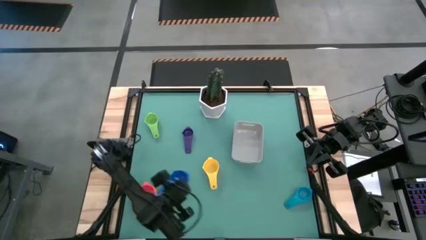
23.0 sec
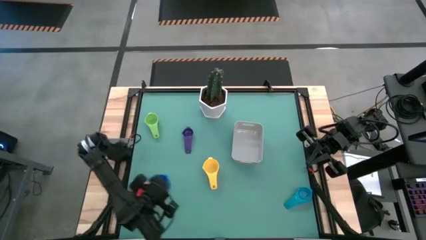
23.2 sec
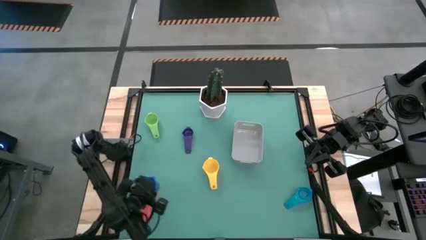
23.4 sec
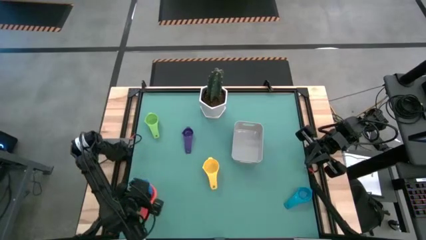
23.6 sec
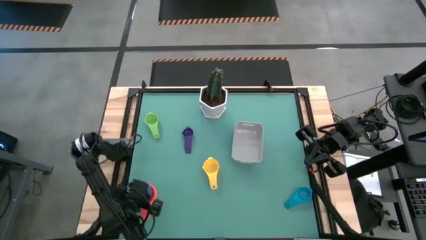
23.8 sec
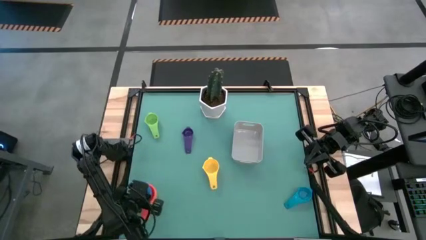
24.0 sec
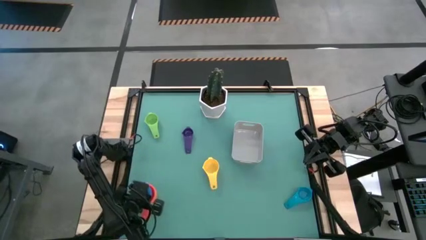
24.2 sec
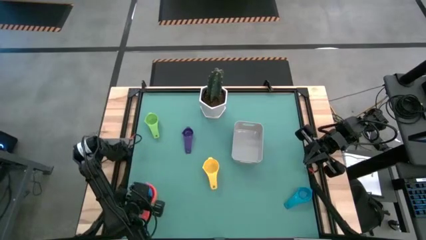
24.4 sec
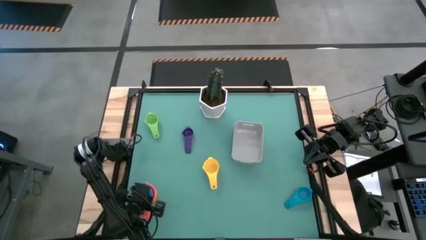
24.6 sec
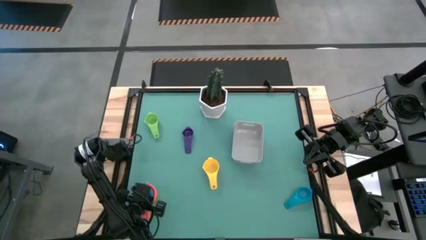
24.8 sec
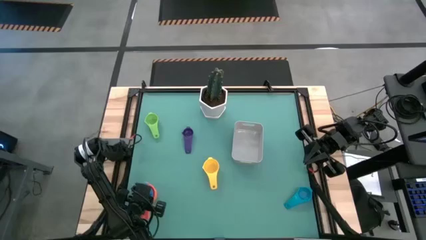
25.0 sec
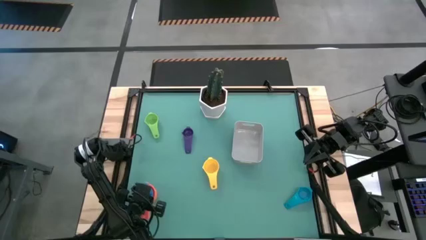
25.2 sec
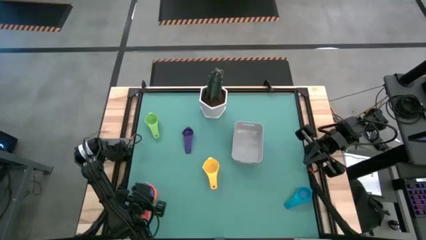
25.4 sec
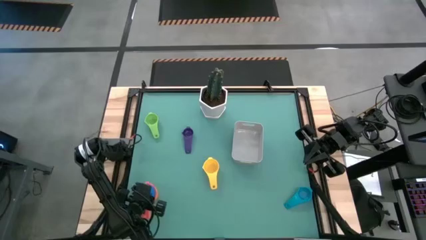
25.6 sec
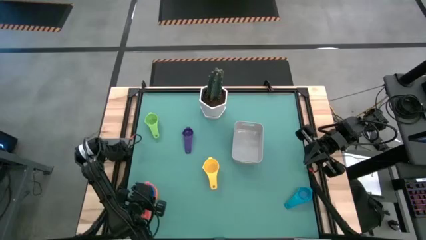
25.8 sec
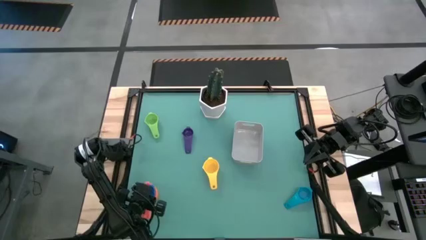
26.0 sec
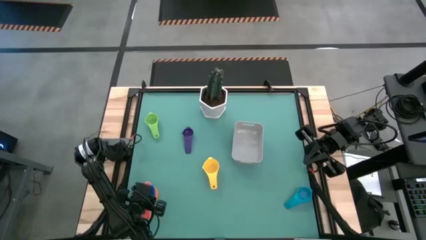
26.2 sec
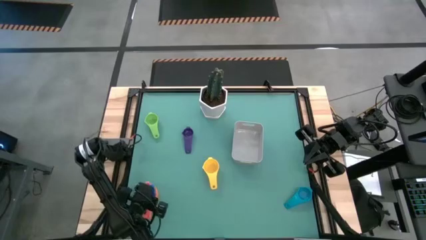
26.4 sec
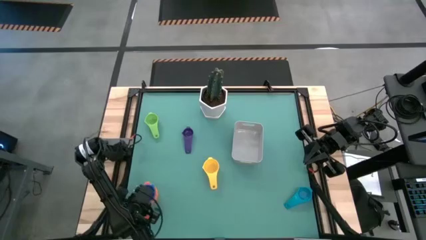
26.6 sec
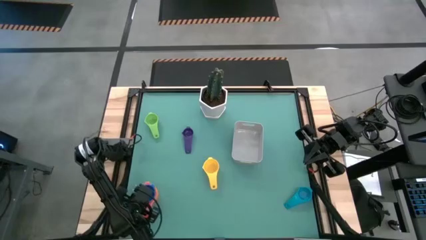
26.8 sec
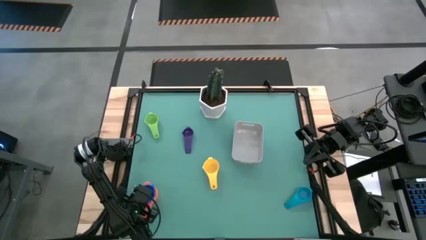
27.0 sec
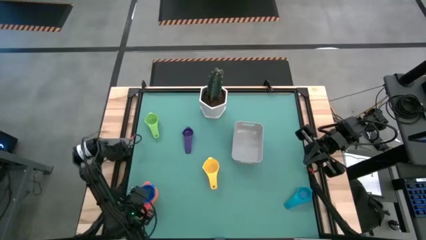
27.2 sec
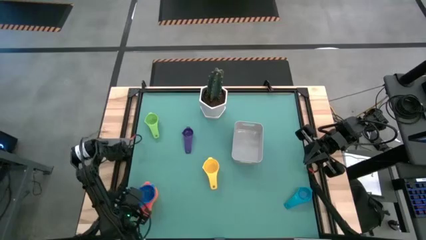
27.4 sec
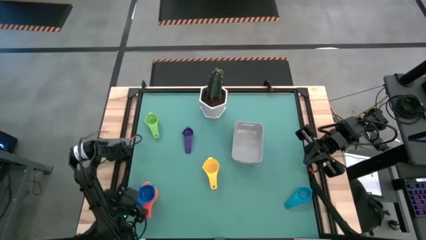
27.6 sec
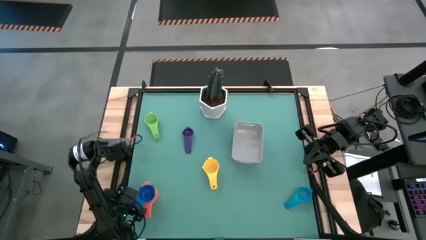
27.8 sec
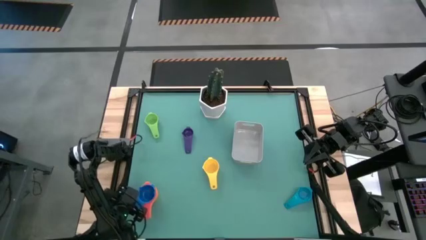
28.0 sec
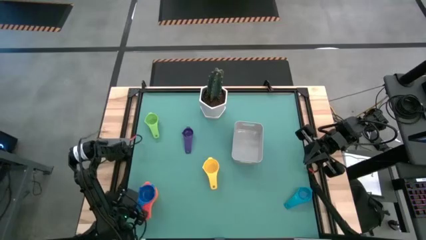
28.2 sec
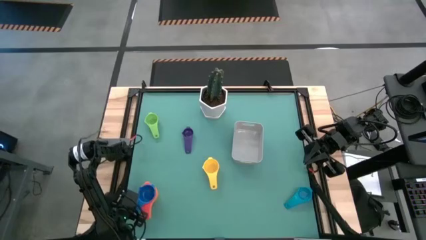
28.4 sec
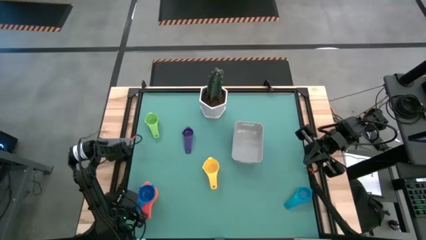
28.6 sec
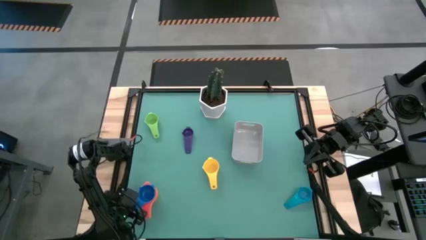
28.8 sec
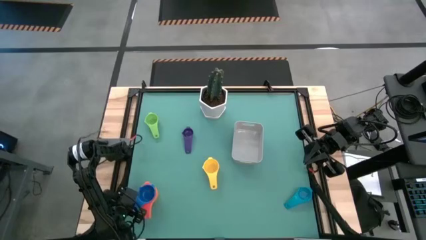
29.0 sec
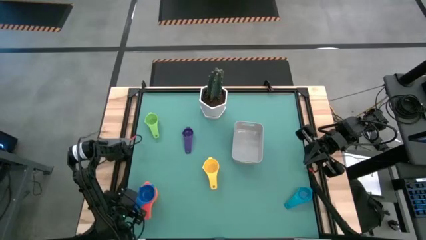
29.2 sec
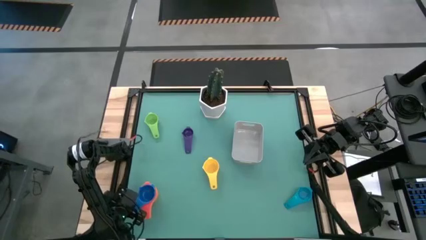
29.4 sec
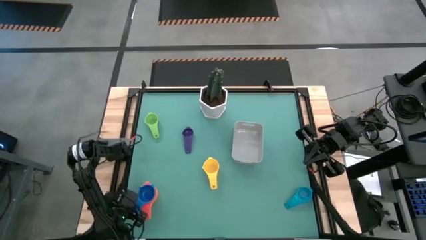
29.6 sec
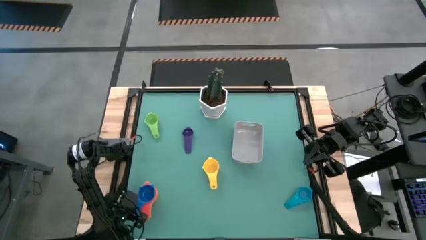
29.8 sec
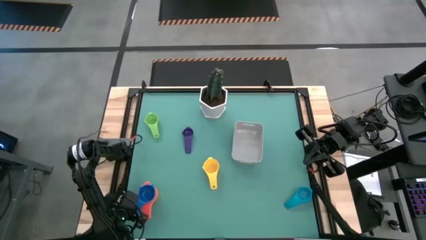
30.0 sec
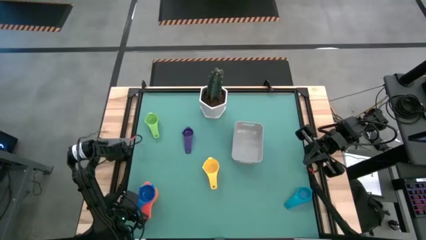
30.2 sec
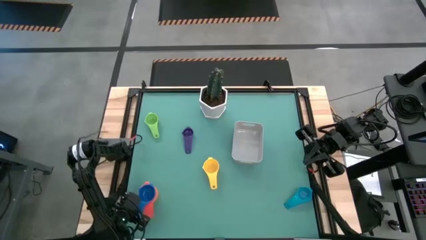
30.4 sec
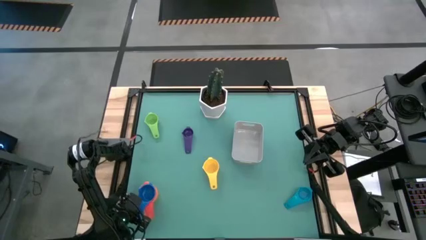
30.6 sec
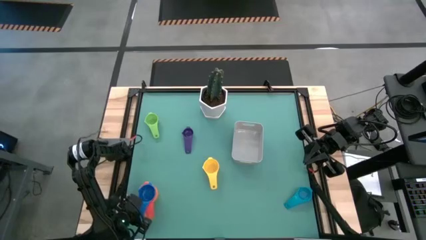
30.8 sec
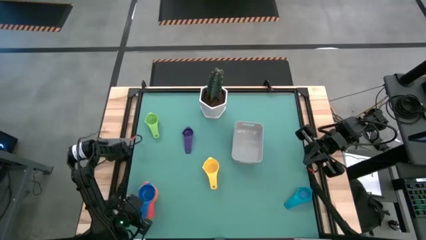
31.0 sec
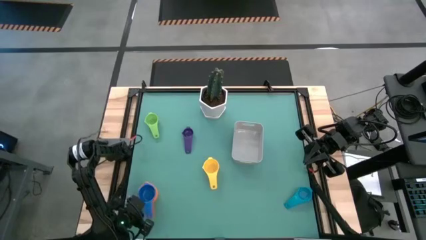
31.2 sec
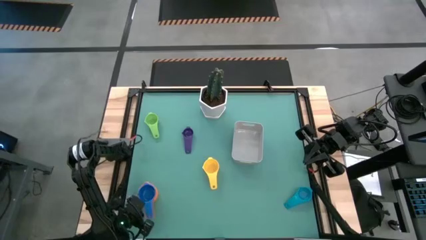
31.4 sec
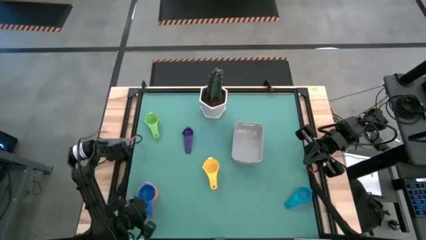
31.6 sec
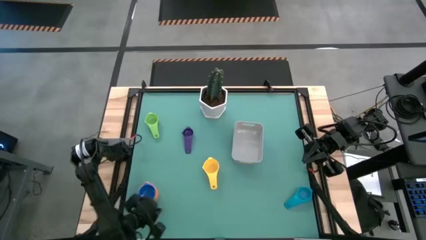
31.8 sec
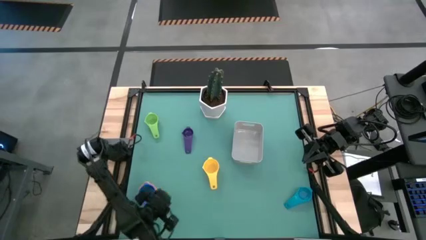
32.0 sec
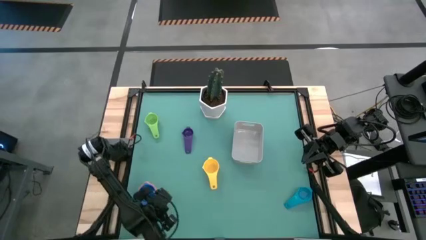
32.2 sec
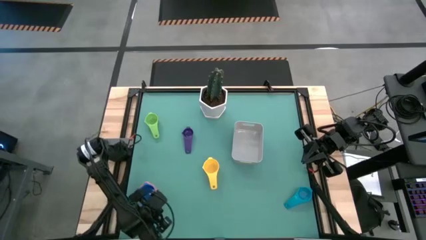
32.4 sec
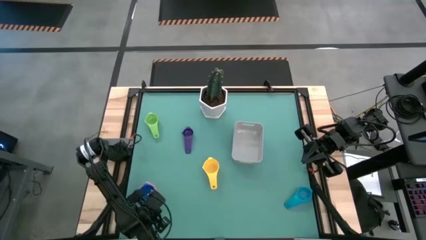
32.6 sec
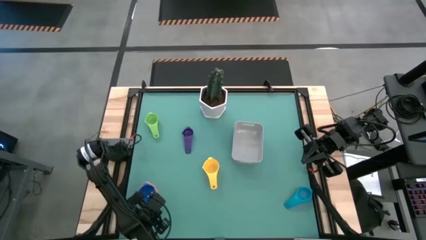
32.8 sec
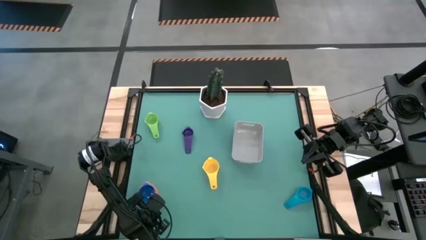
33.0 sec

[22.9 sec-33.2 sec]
Task: Nest measuring cups in basket
Stack the blue measuring cup on the top of the red measuring cup

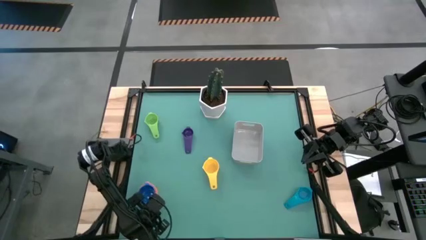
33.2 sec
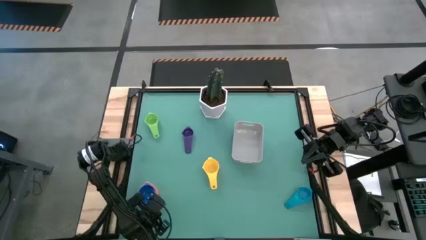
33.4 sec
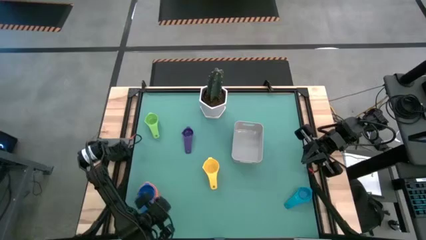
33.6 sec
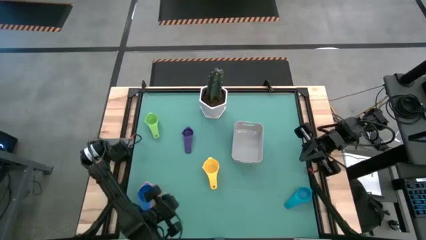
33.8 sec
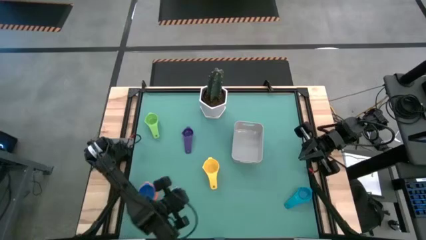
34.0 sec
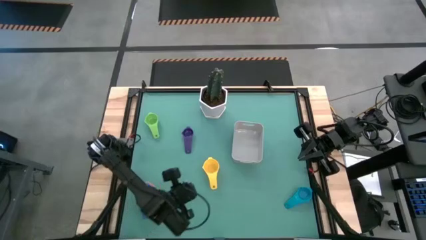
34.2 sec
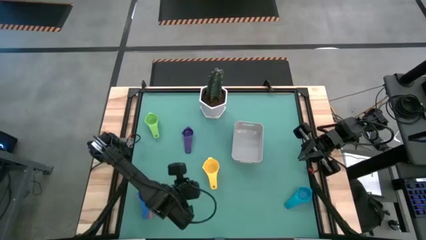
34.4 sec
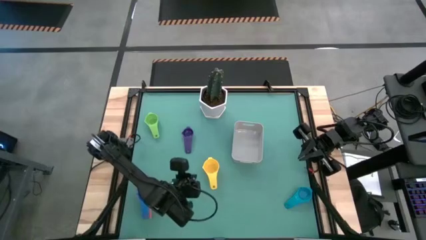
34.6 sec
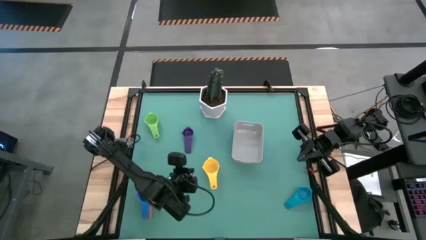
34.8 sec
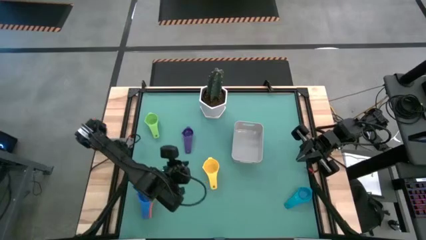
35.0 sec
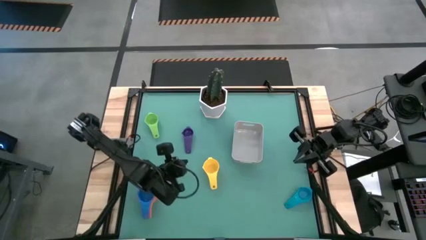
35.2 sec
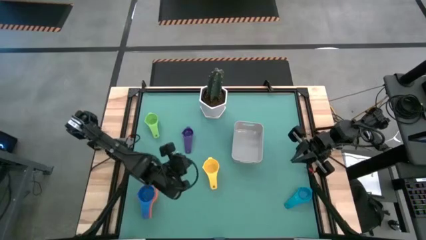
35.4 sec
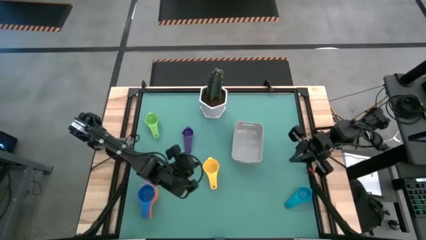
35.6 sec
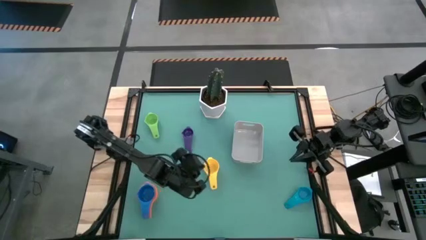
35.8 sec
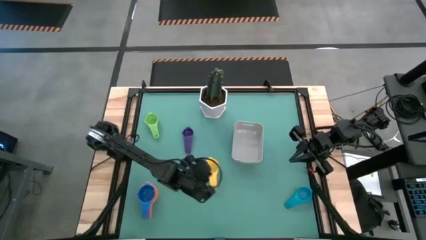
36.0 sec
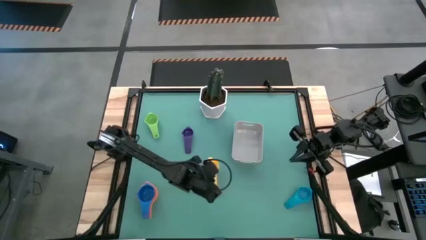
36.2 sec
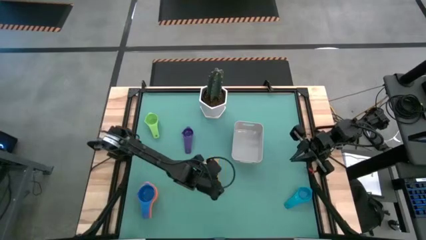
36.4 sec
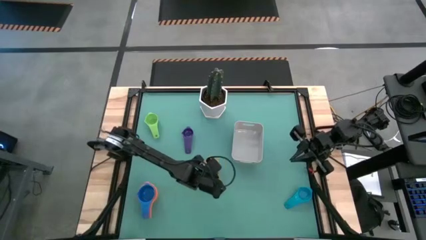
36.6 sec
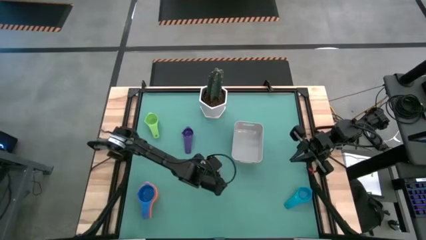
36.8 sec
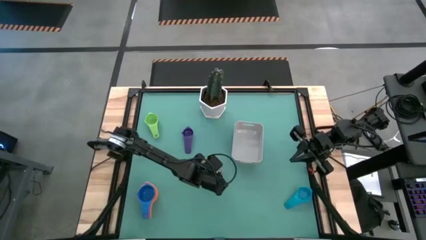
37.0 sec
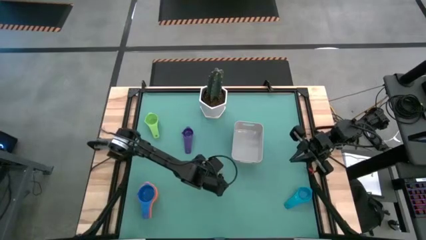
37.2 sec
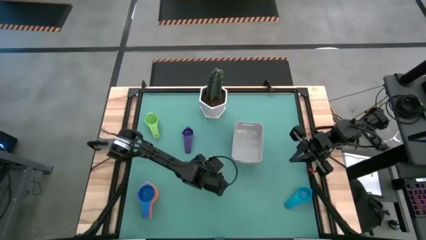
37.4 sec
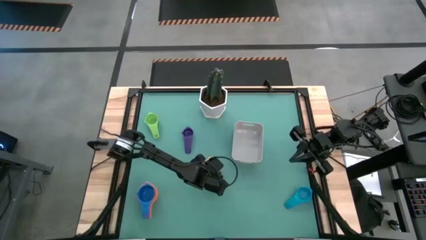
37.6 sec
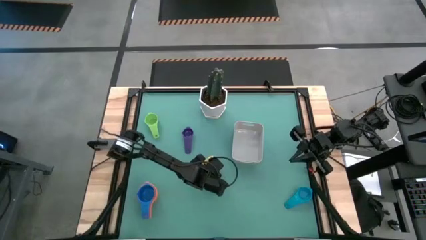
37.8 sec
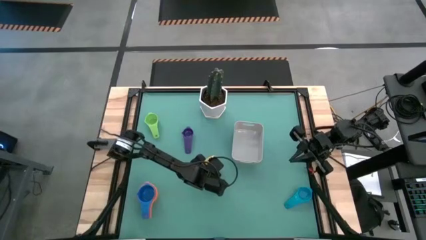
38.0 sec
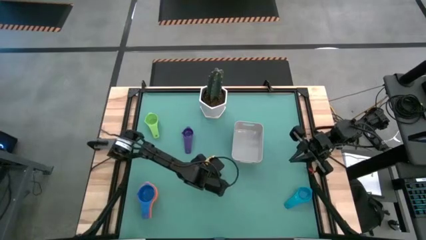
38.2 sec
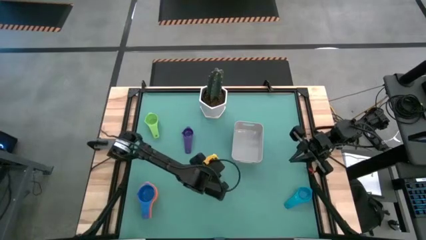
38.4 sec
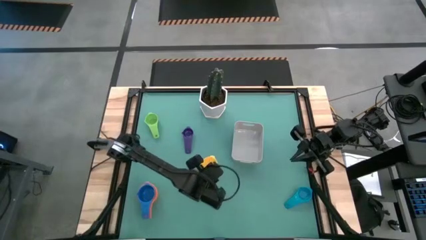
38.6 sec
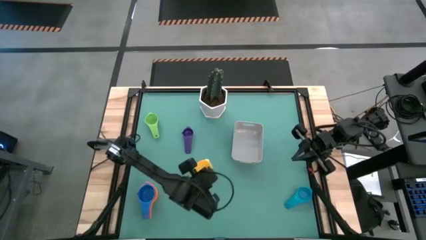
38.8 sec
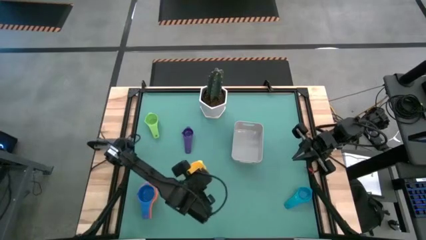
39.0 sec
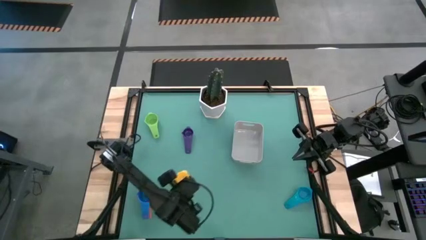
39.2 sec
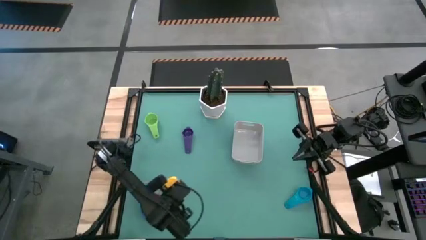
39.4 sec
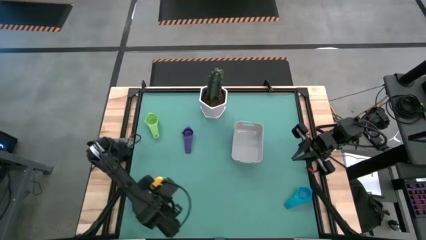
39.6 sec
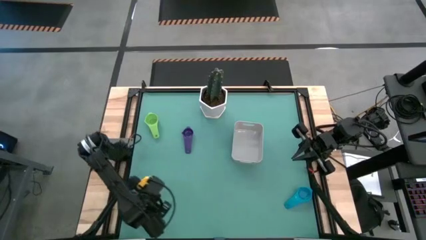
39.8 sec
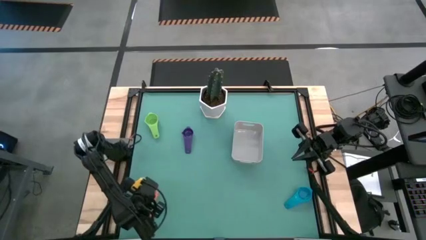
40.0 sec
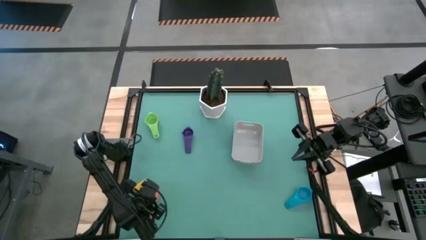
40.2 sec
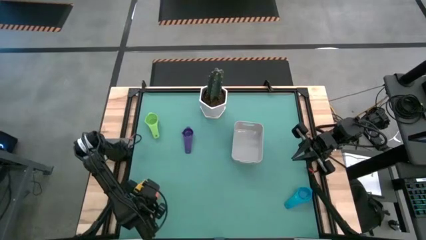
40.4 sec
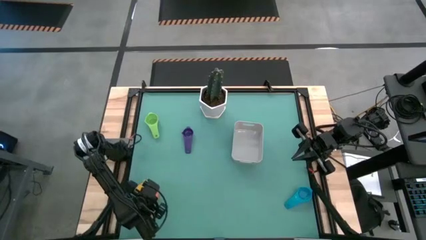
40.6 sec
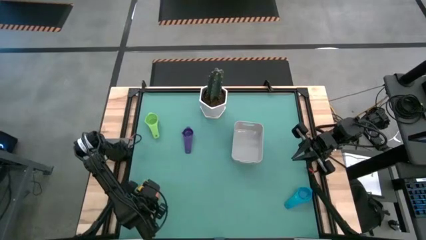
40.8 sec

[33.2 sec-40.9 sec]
Stack the yellow measuring cup on the top of the blue measuring cup
